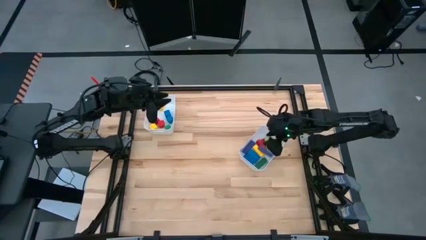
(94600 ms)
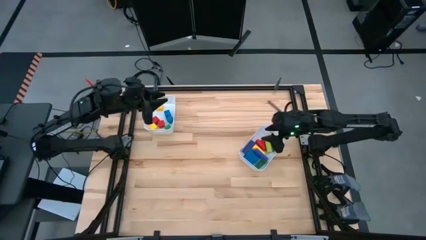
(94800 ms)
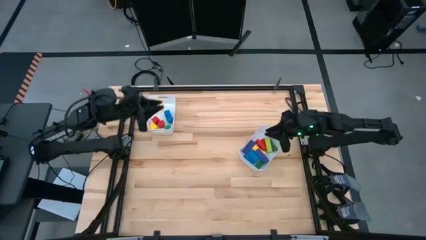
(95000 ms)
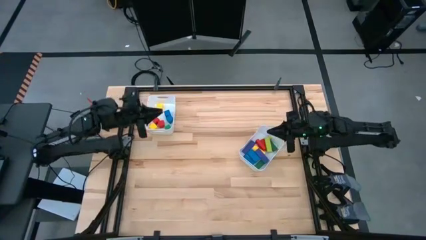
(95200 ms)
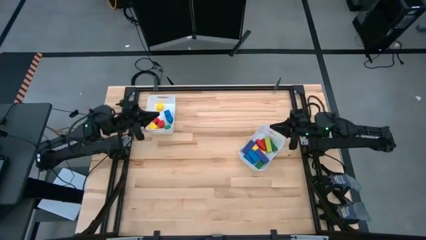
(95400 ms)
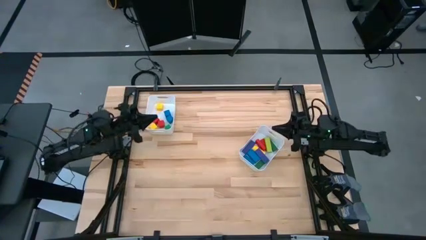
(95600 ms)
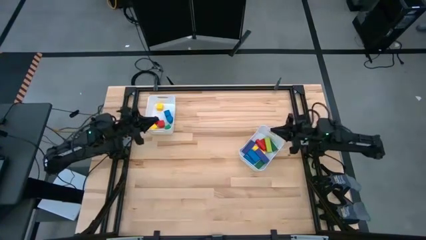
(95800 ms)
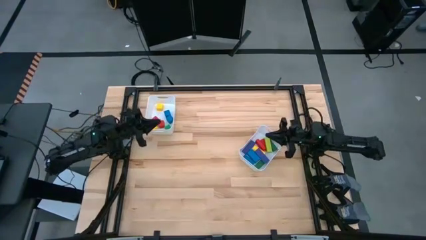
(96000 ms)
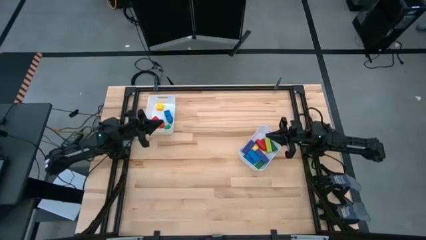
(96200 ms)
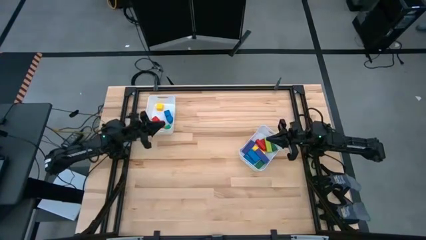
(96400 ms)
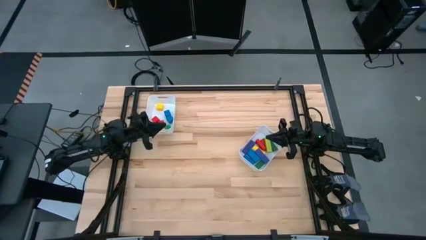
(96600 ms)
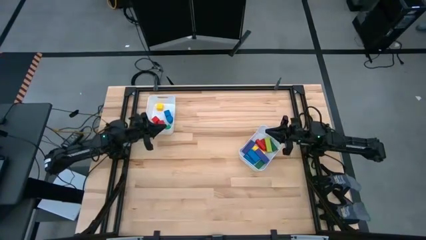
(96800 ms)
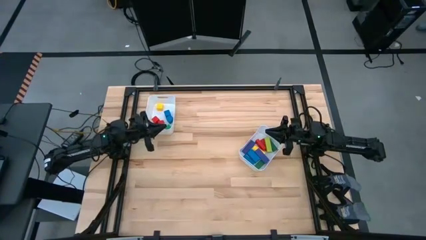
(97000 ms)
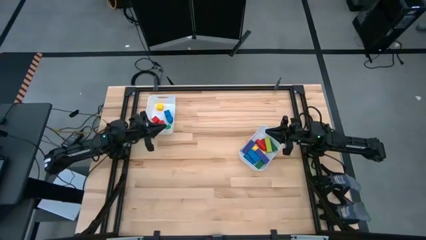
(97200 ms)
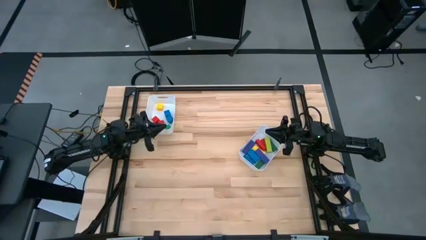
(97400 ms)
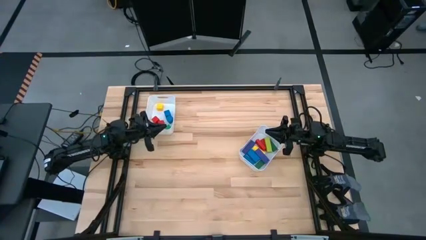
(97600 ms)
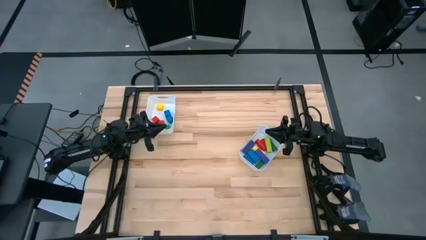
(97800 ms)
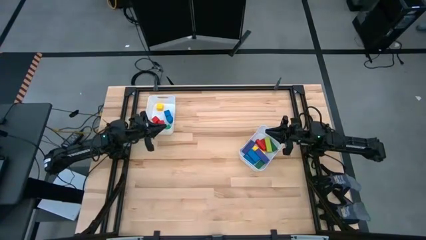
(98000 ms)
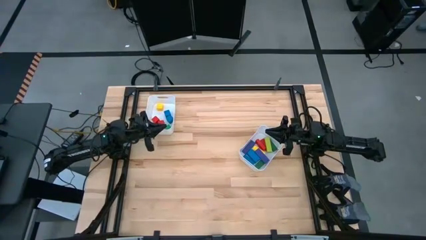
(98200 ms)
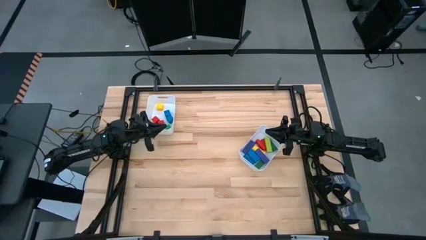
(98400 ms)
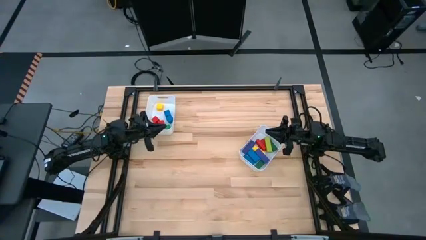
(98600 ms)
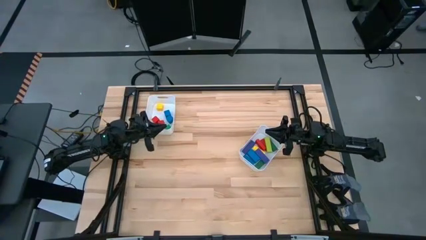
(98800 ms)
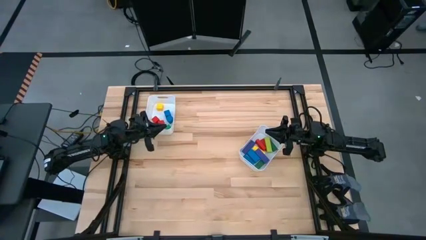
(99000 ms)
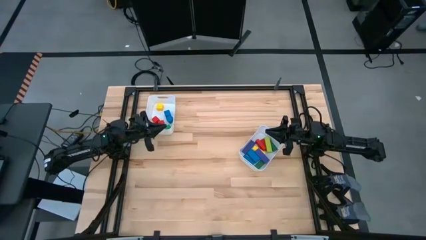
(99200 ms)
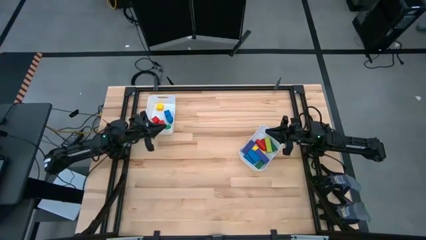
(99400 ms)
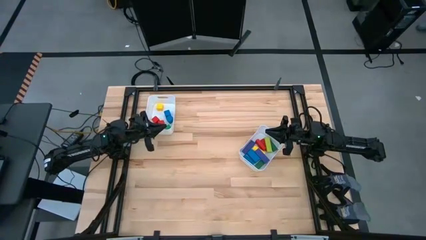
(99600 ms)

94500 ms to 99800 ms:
Task: Sort blocks by size
Return to Home Position

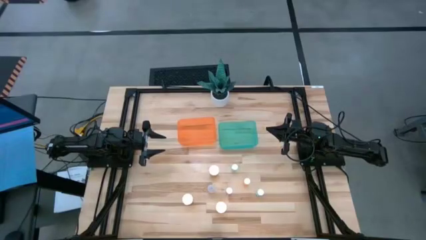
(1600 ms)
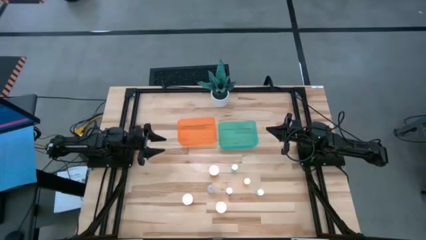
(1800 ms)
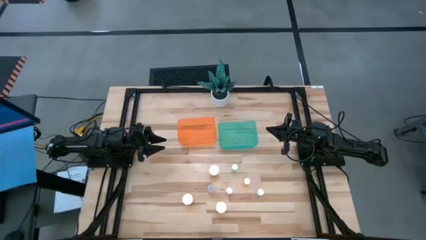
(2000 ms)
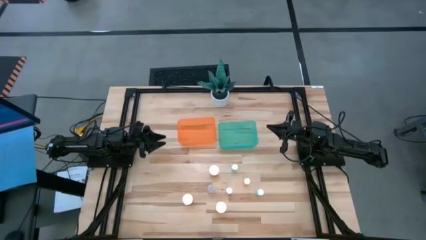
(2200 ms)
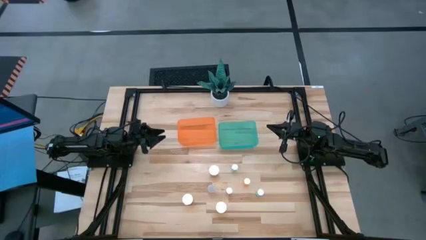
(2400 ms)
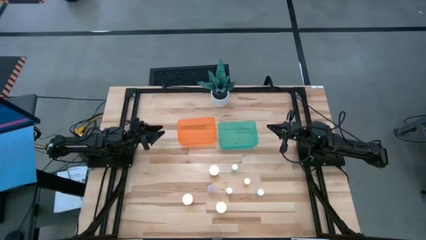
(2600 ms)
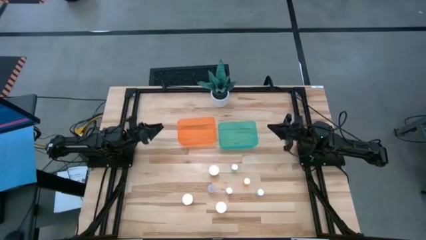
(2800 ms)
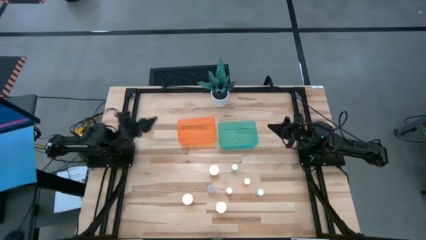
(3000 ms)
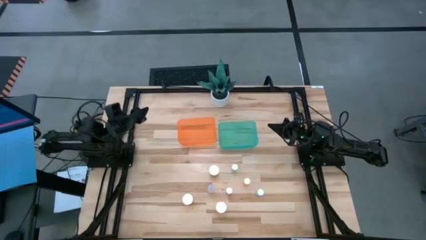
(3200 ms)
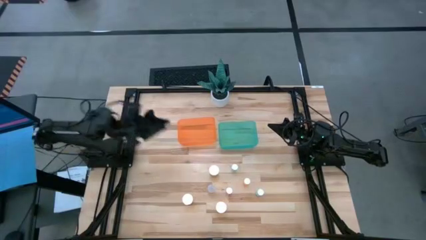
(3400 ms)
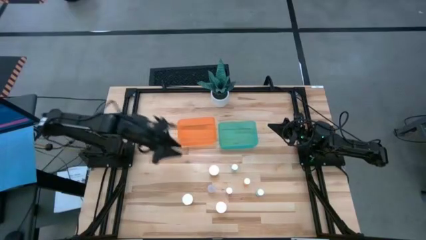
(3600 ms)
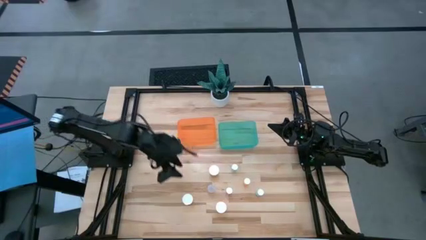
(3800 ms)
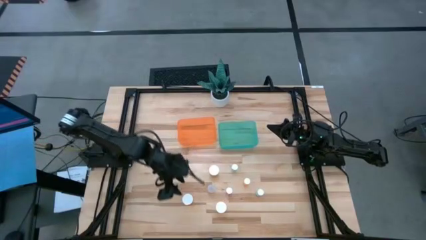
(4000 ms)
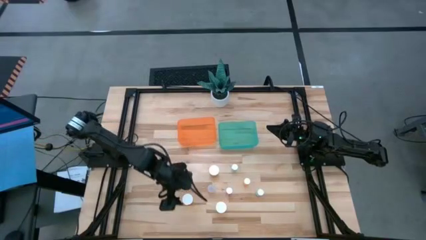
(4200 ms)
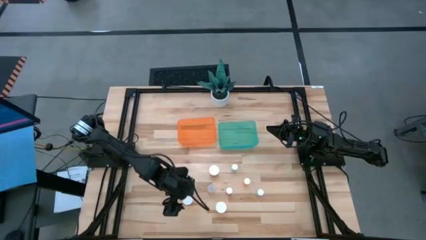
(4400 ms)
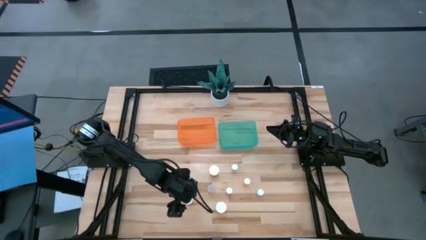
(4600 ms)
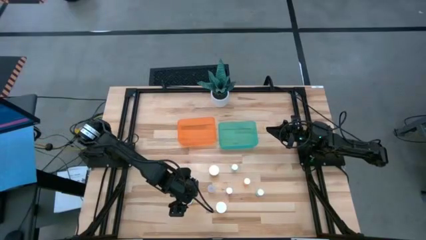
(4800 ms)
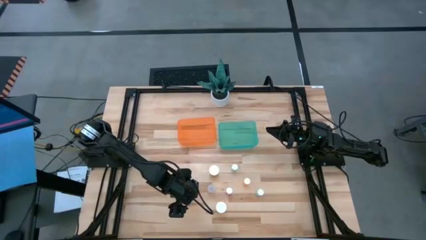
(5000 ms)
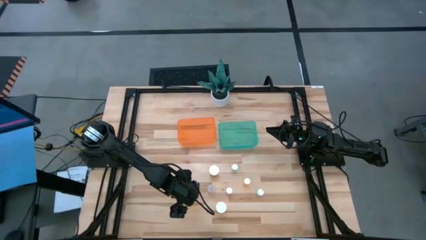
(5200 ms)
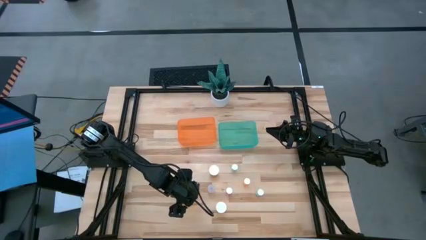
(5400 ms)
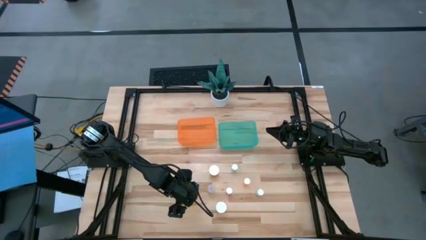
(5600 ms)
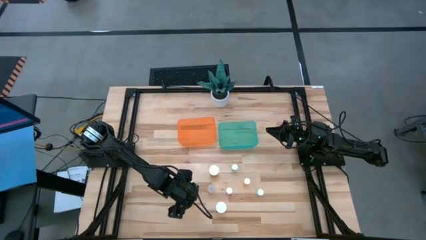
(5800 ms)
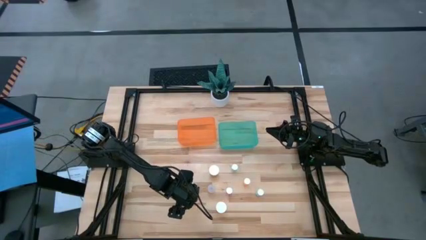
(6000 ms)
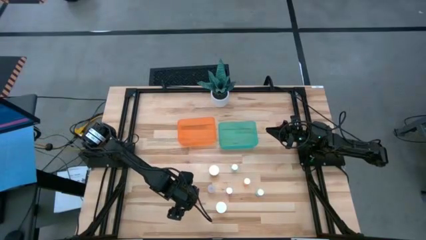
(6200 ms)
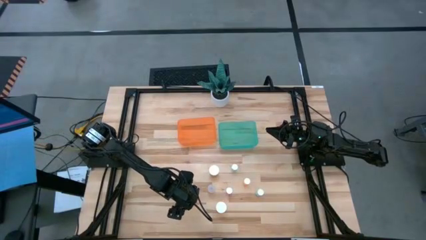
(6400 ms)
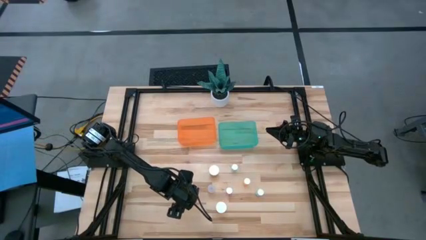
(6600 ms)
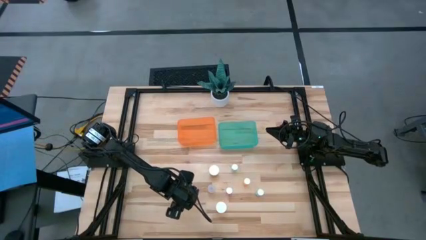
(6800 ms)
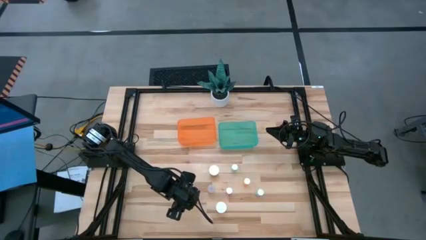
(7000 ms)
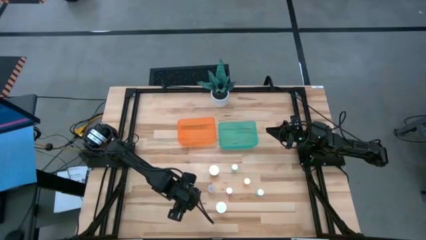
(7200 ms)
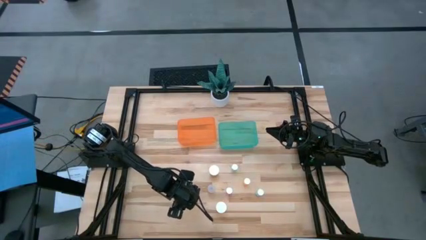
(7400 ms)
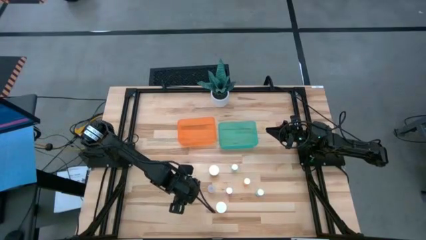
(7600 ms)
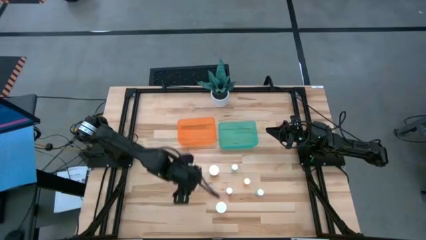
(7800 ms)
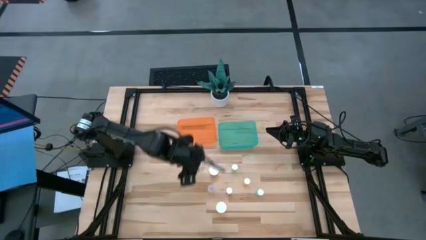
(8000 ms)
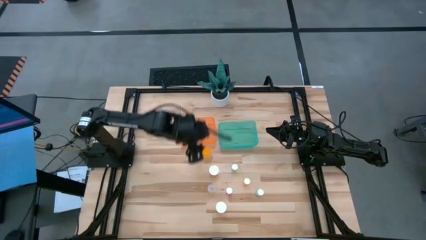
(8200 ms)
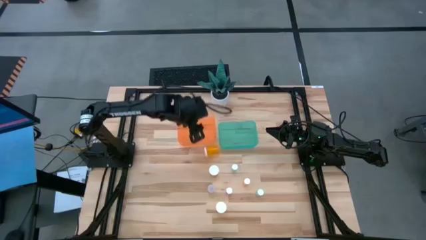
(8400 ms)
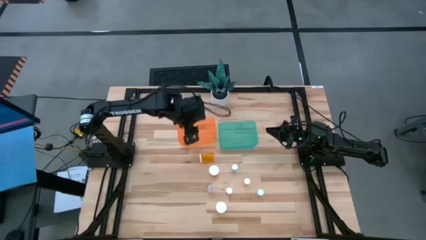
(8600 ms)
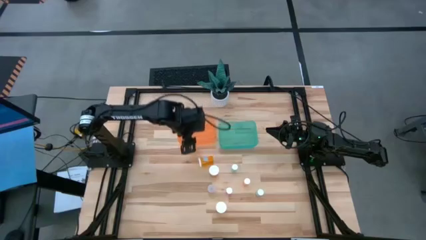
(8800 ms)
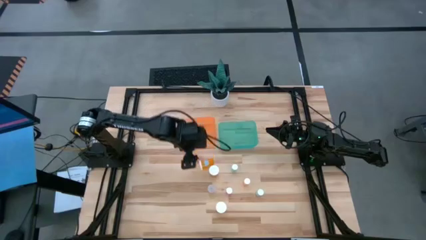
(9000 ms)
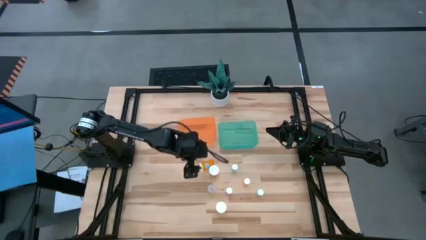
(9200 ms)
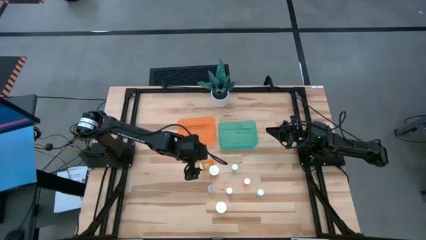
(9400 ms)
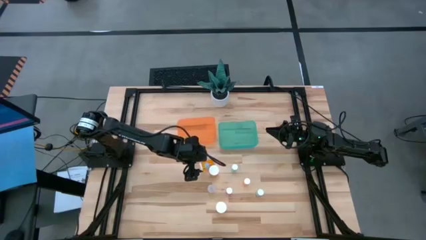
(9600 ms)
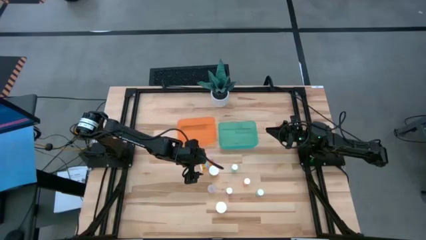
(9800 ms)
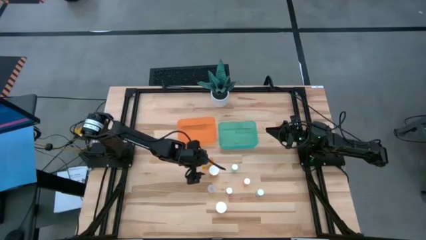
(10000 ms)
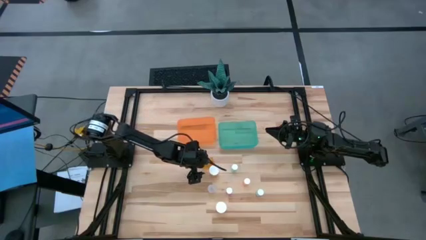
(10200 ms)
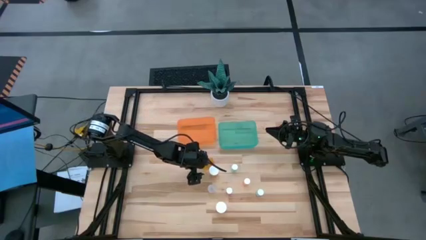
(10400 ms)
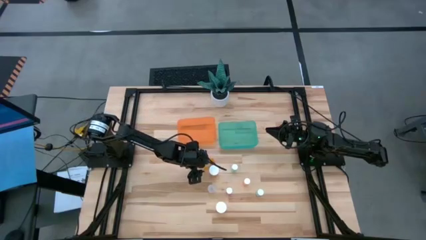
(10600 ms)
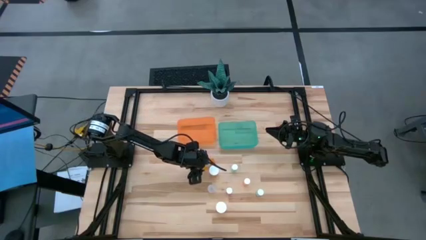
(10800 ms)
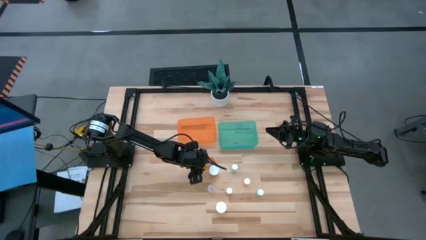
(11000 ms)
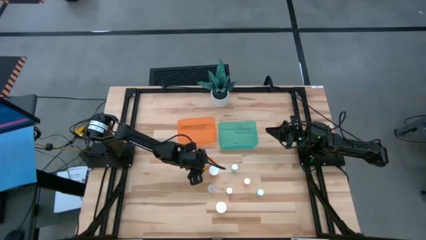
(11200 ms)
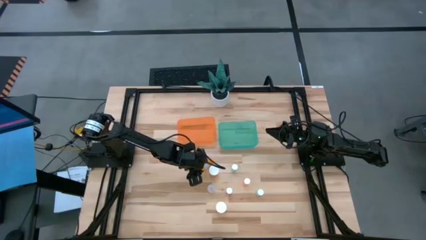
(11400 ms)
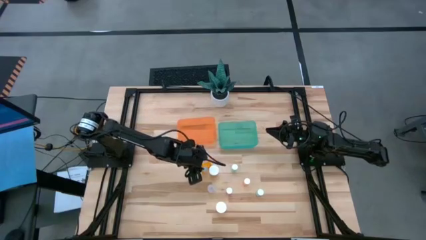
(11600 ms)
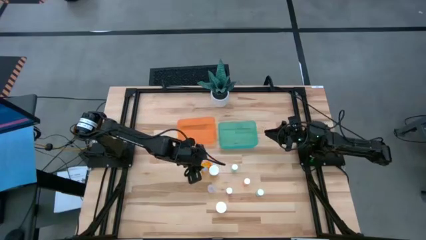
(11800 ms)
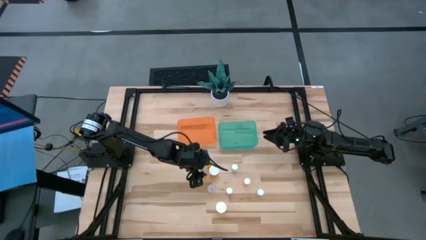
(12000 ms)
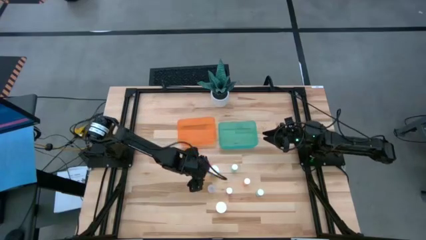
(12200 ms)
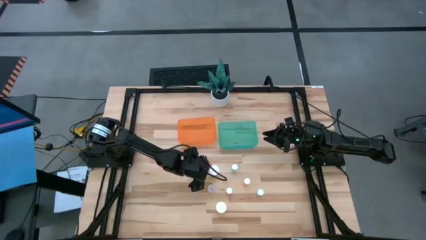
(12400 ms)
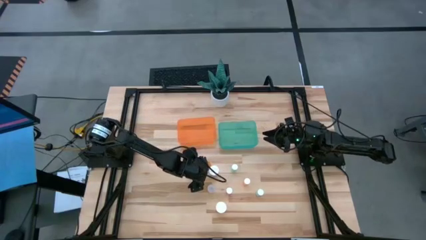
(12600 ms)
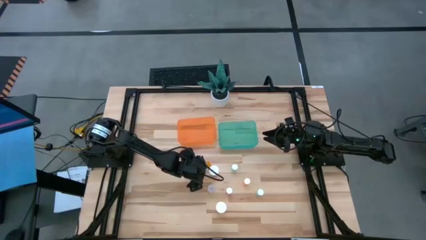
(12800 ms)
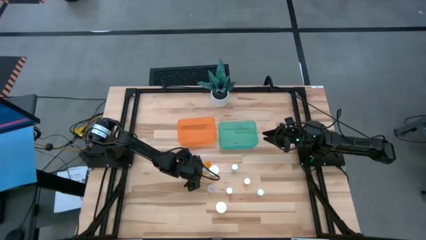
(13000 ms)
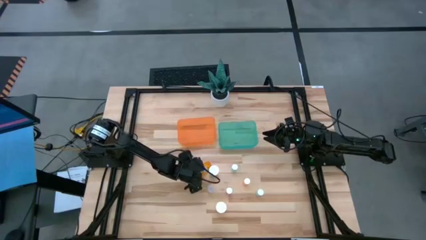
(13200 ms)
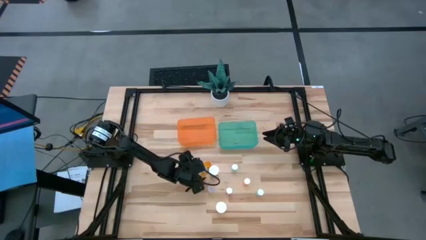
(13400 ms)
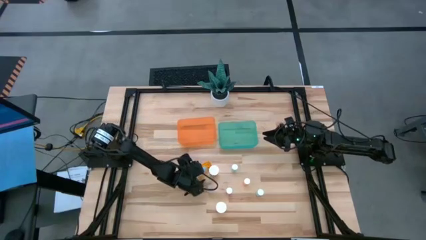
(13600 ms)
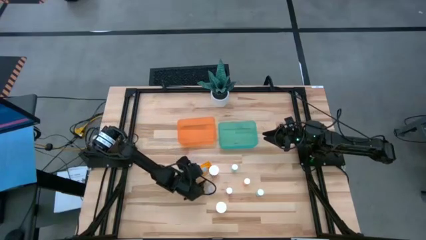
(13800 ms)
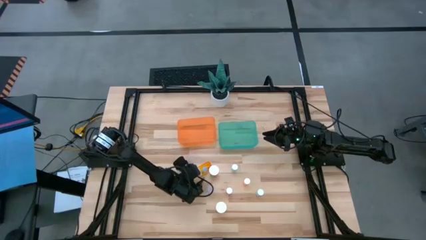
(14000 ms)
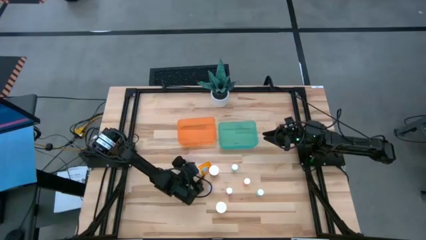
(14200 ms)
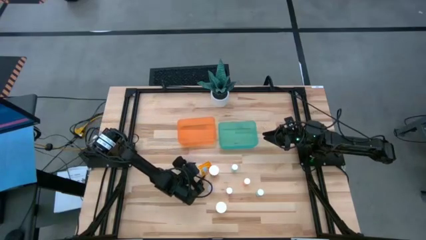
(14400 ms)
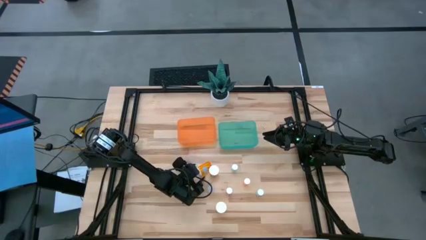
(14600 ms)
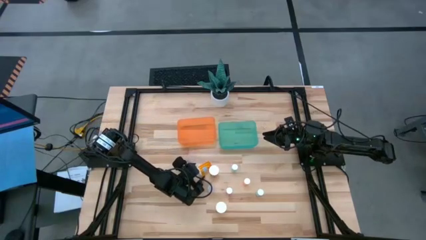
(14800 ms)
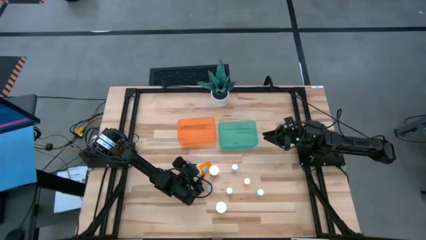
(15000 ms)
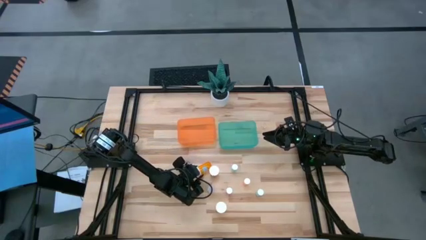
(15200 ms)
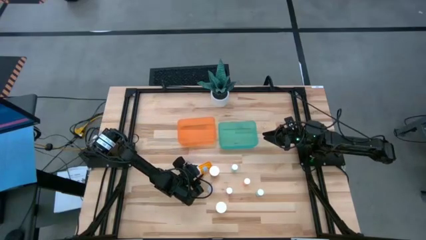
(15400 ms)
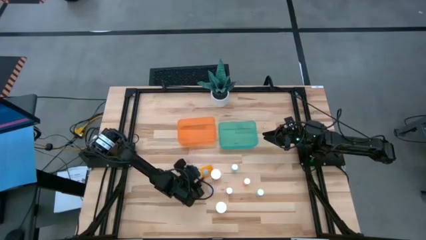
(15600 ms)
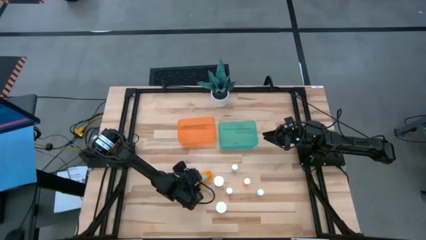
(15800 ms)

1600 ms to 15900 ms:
Task: Pick and place medicine bottles into bin by pill shape (circle, oval)
Put the bottom left orange capsule bottle into the orange bin
